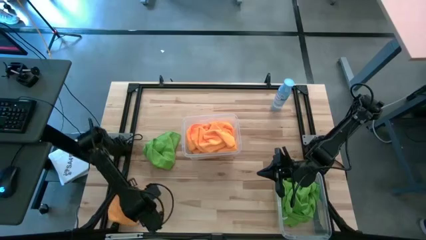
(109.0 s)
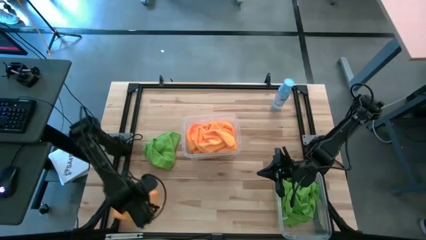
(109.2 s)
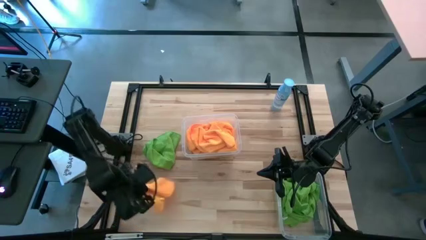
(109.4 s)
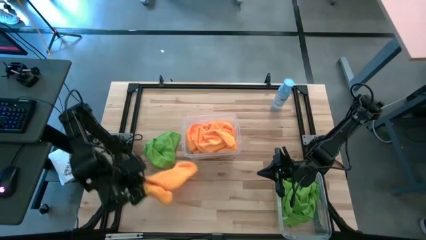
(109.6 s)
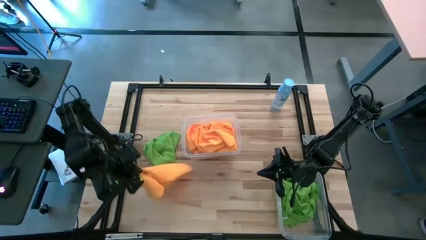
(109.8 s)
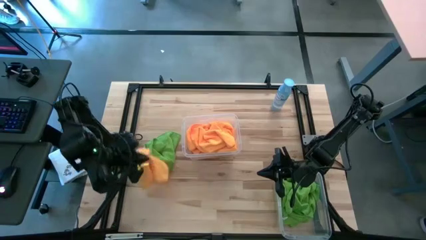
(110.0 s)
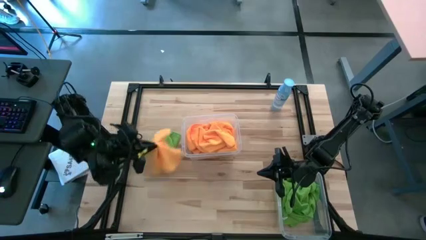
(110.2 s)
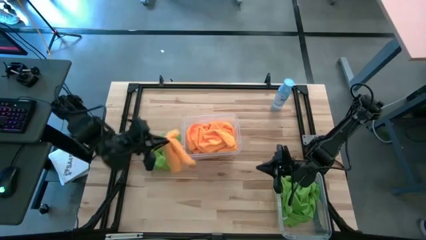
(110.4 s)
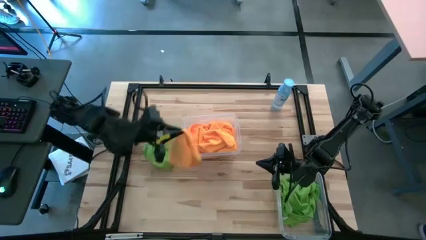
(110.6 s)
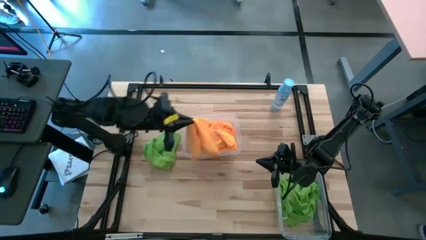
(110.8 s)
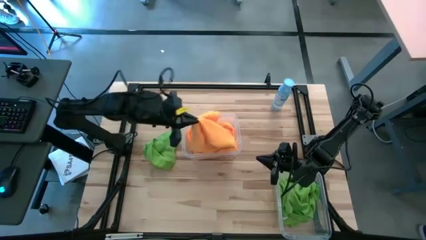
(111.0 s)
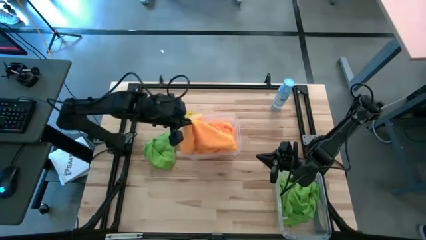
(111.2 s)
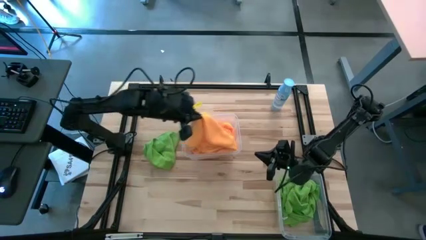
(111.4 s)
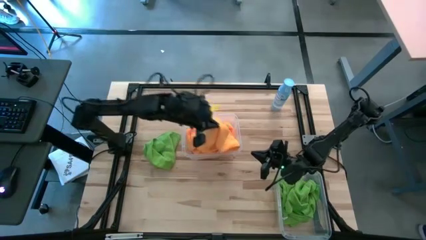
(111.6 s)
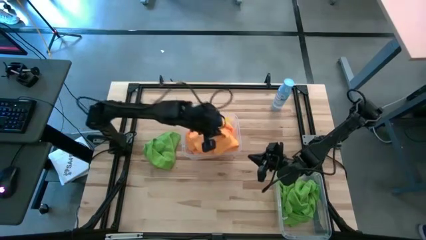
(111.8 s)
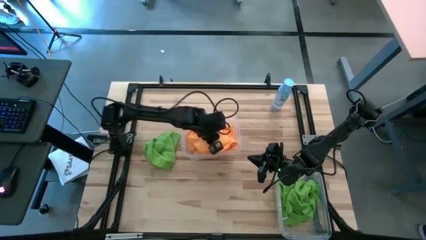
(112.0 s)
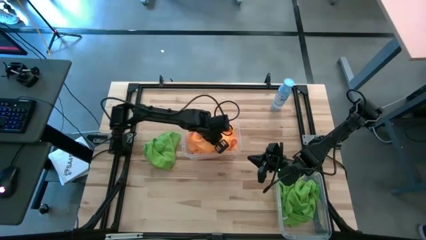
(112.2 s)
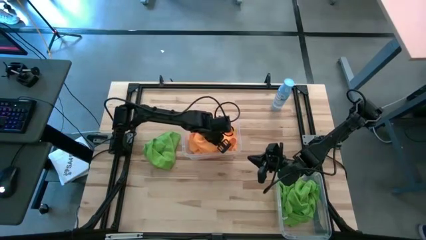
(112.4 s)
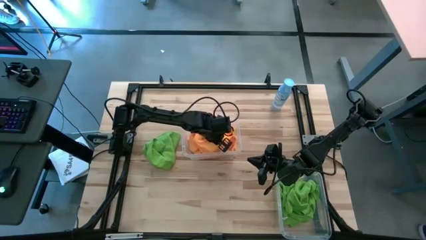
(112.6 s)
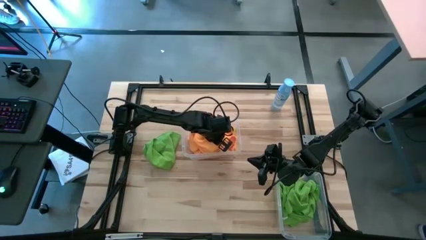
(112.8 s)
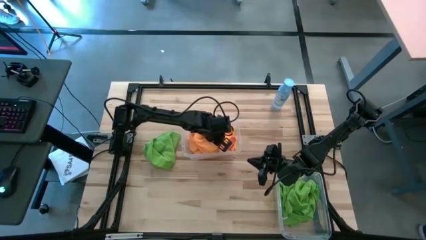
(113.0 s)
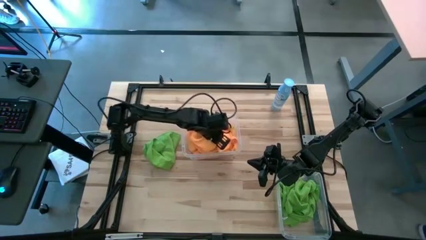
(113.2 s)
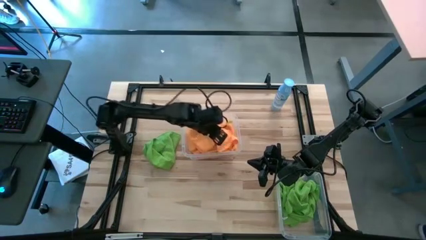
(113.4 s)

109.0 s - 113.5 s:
Task: Sort microfiber towel by color & place in baskets
Put the yellow microfiber cloth into the top transparent bin

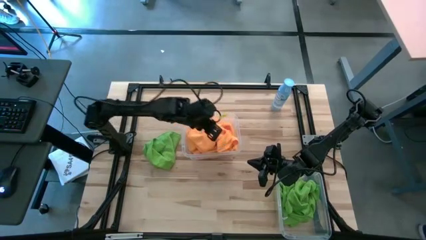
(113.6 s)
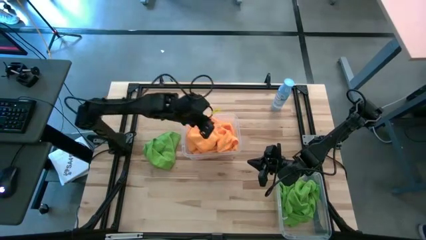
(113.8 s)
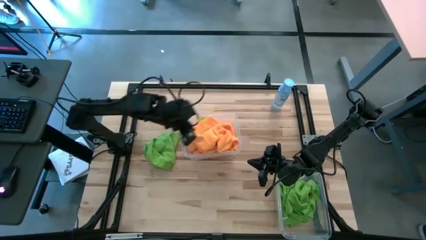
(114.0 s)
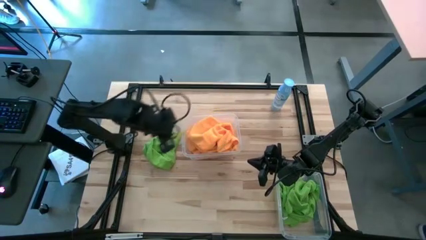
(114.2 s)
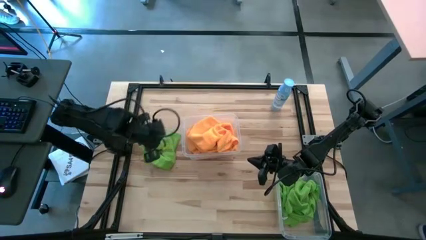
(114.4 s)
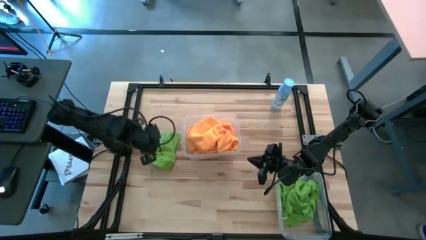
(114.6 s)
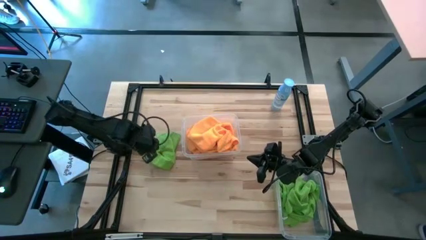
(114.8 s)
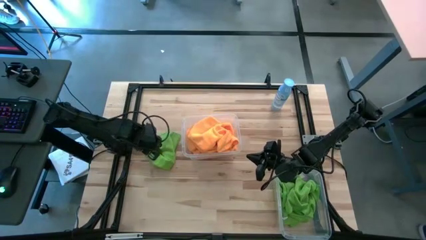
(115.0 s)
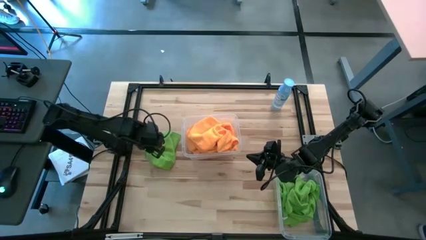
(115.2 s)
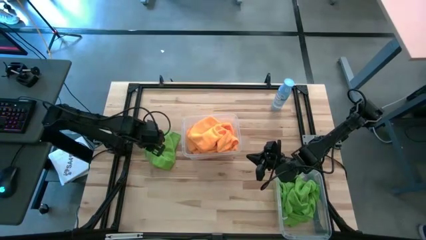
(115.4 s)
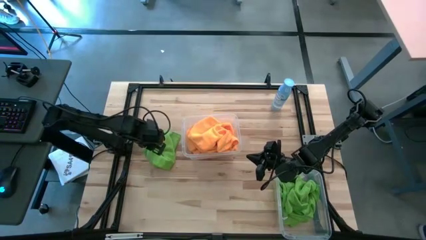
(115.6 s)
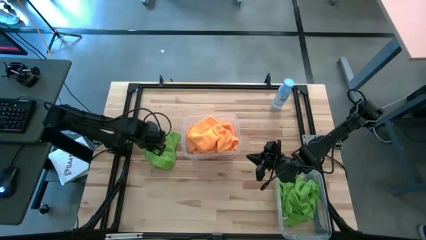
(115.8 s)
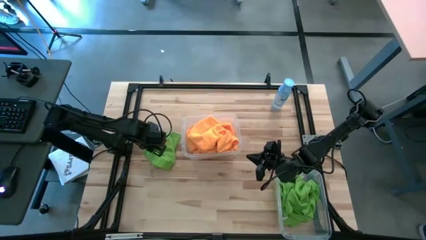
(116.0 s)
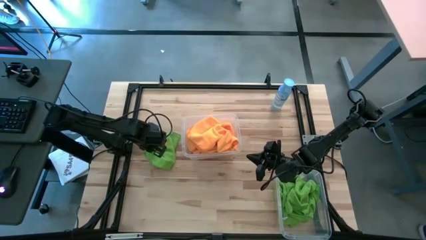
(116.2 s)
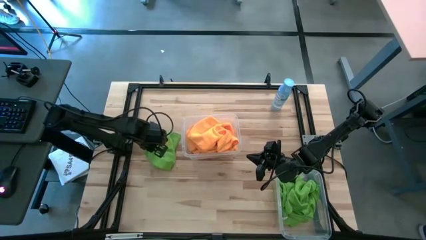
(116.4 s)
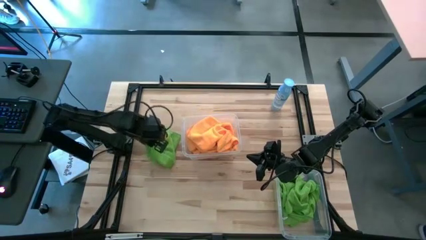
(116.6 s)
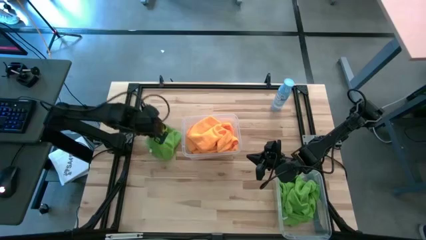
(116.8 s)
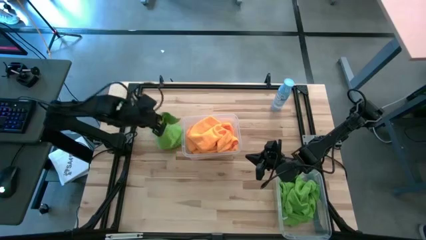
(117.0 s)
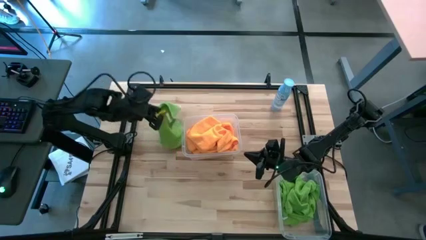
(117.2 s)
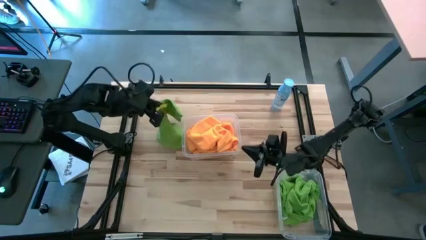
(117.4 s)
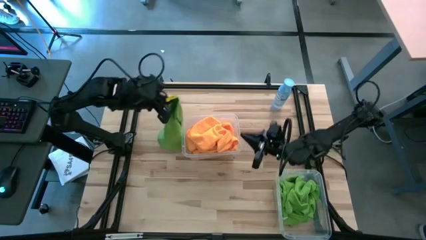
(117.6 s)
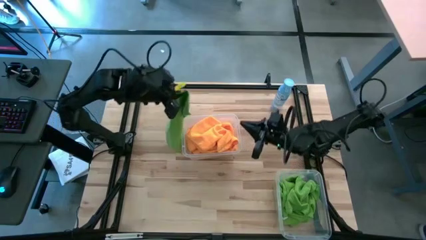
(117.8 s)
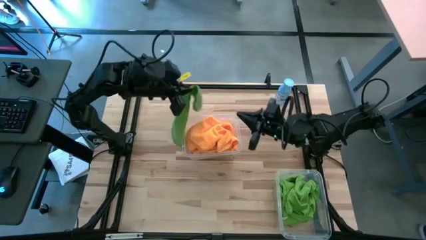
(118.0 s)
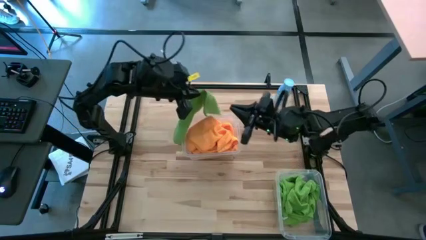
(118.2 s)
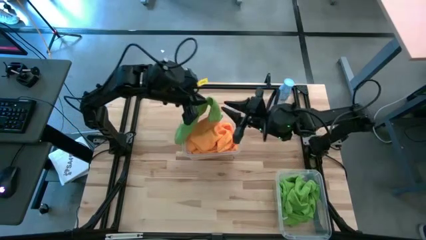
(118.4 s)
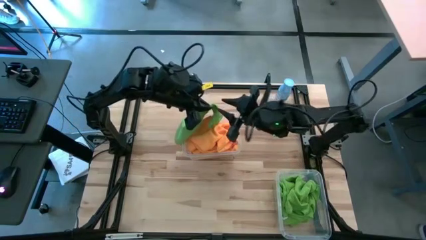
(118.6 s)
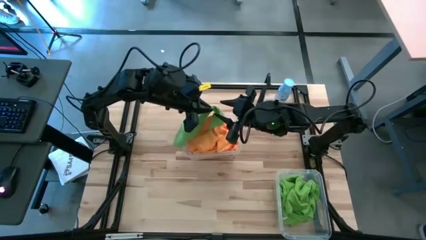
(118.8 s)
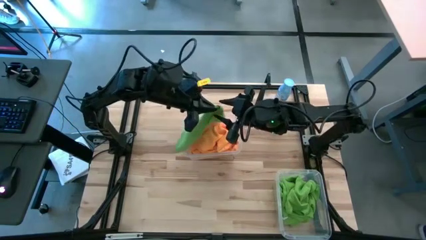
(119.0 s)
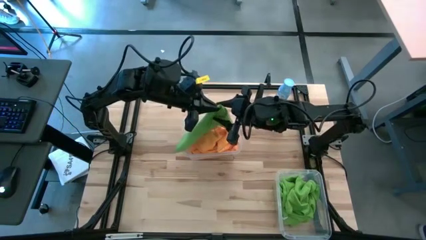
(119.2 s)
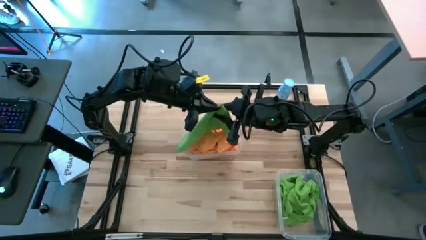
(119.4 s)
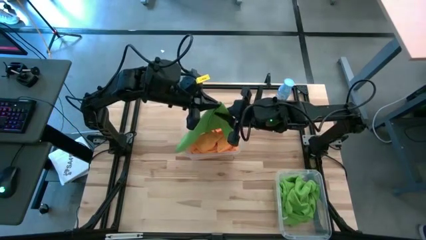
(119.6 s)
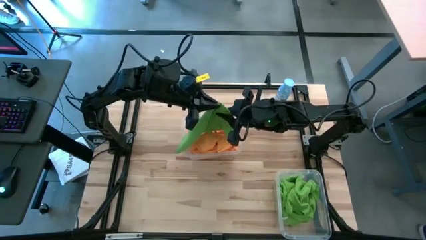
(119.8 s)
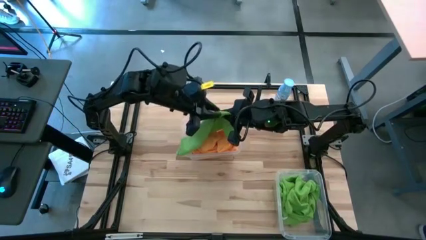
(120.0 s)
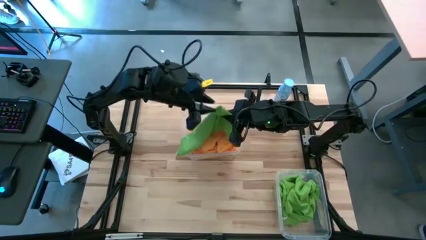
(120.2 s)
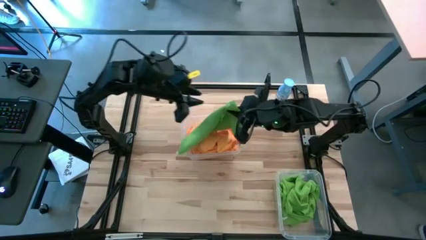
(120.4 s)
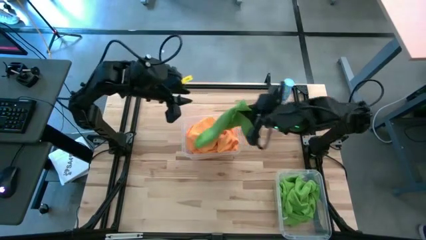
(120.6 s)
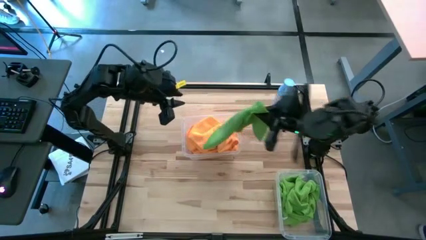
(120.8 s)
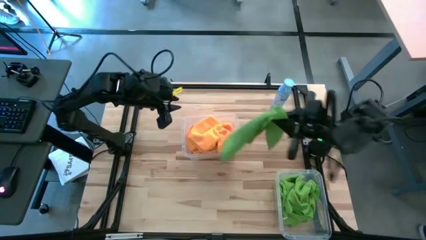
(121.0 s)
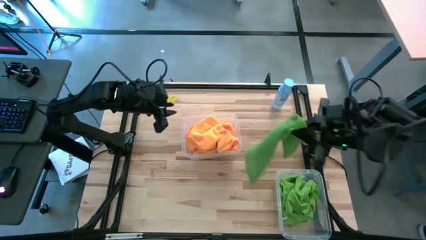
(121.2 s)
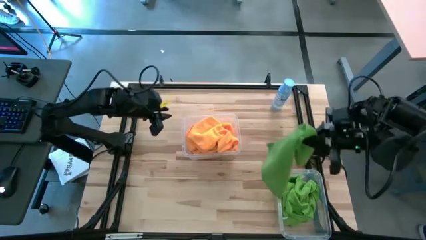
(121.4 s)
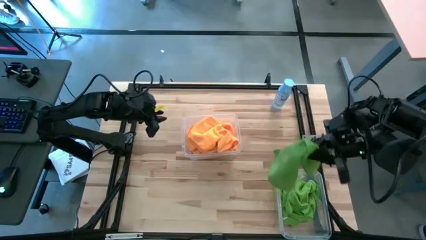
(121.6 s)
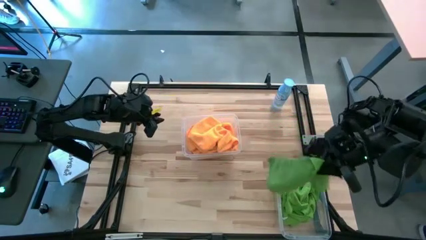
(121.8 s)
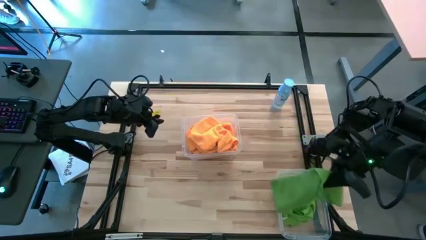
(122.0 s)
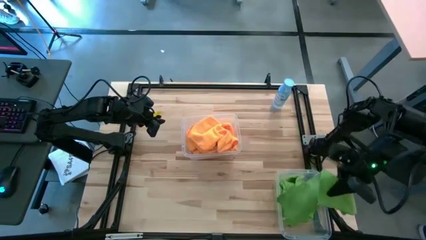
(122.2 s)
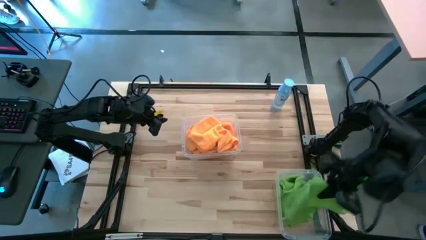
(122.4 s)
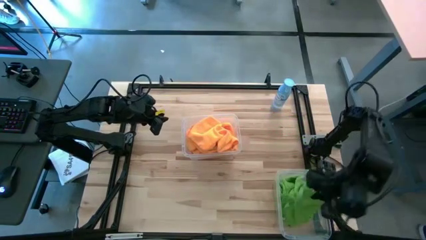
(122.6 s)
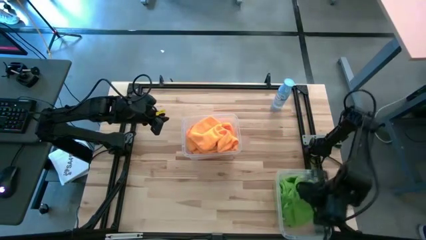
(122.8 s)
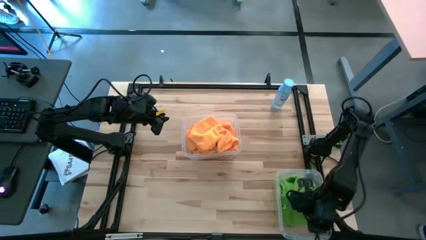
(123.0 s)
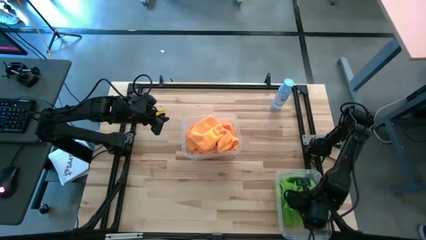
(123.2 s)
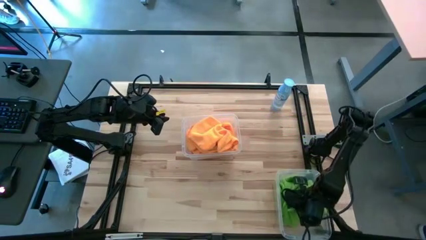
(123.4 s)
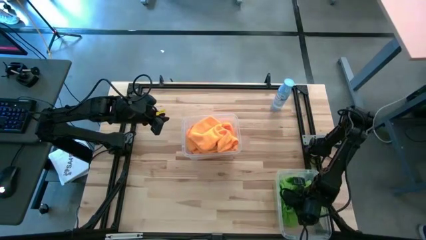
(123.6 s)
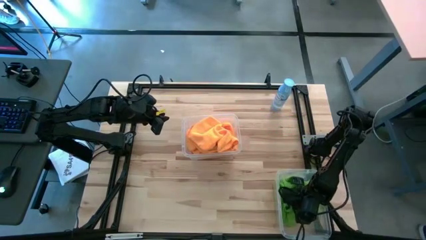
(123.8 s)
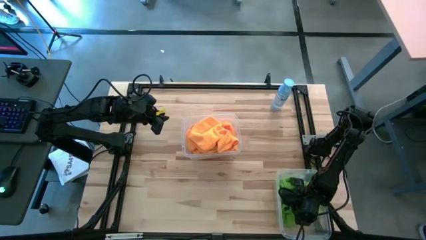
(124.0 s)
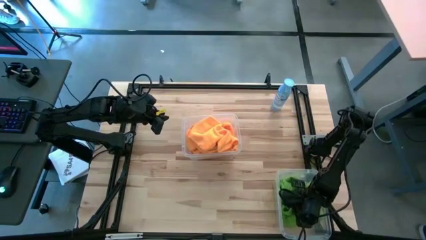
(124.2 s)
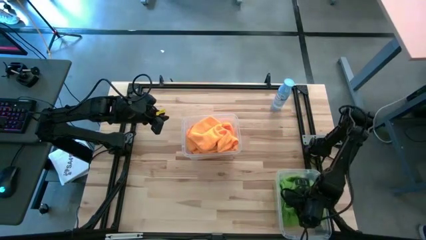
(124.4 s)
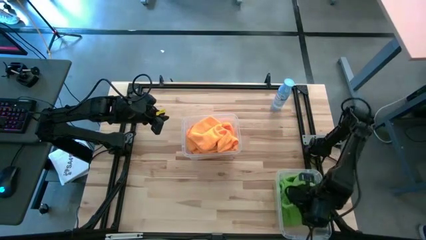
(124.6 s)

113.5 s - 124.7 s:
Put the green microfiber cloth into the bottom transparent bin

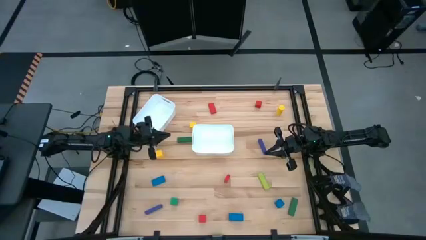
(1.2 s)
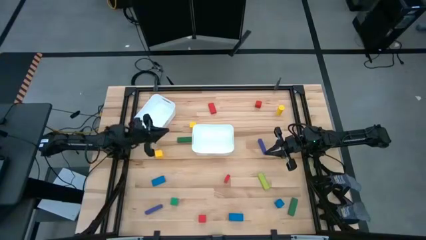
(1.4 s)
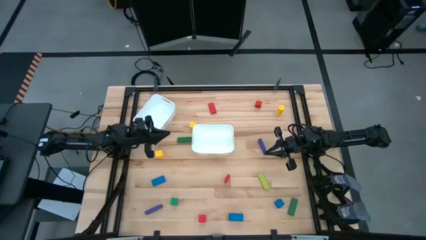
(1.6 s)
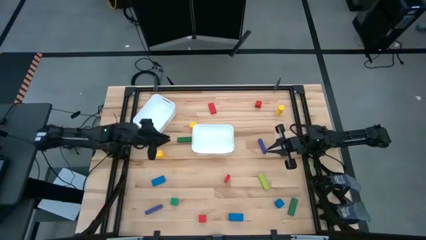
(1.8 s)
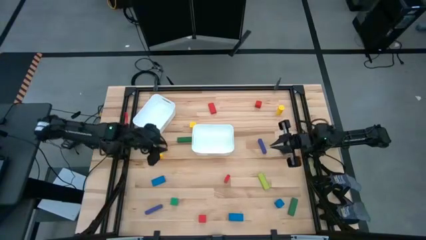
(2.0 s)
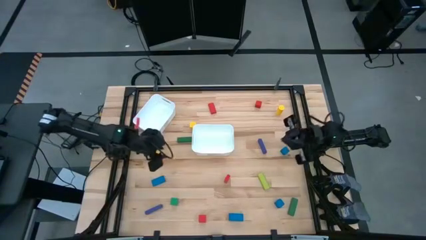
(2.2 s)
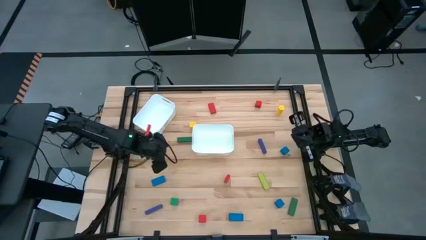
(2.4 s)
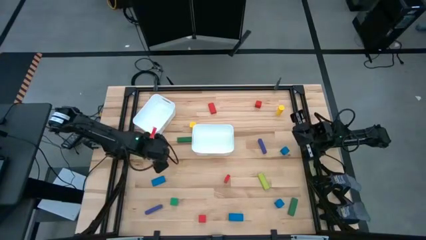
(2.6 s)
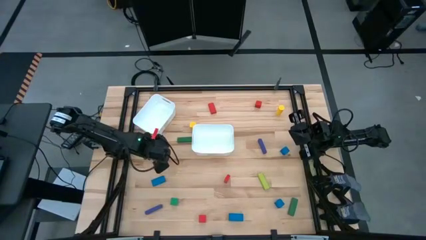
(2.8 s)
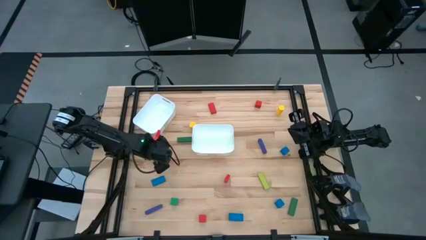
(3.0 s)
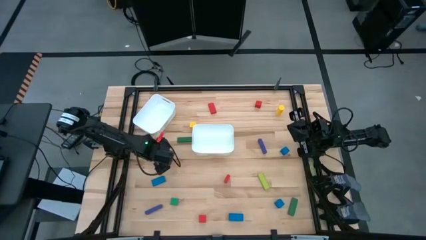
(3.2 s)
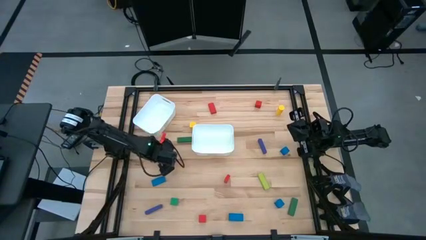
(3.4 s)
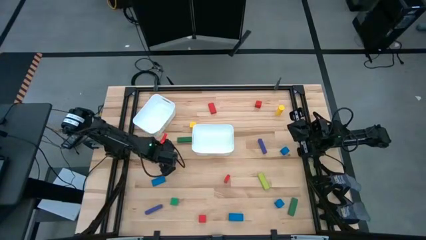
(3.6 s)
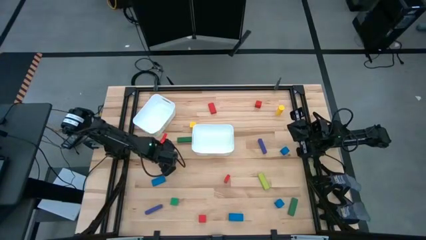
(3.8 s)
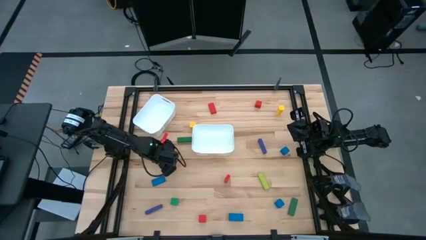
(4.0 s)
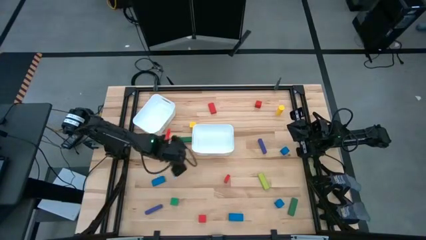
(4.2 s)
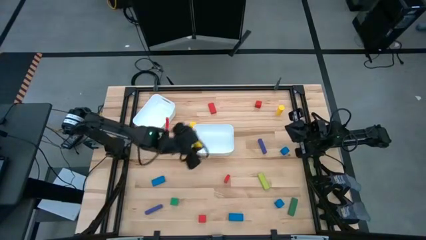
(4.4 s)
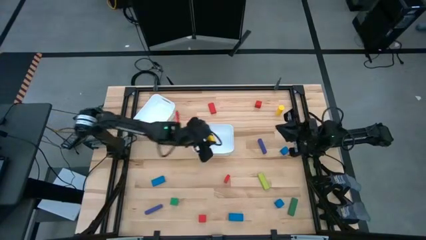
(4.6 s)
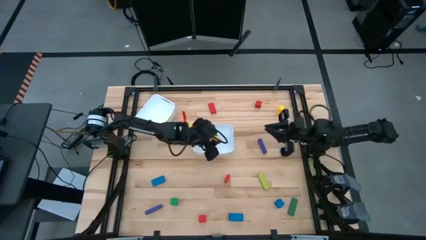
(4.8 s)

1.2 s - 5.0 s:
Task: Sort blocks by size
Put the bottom yellow small block into the bottom white bin
